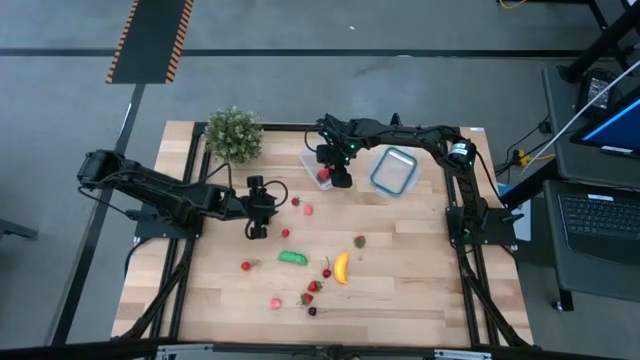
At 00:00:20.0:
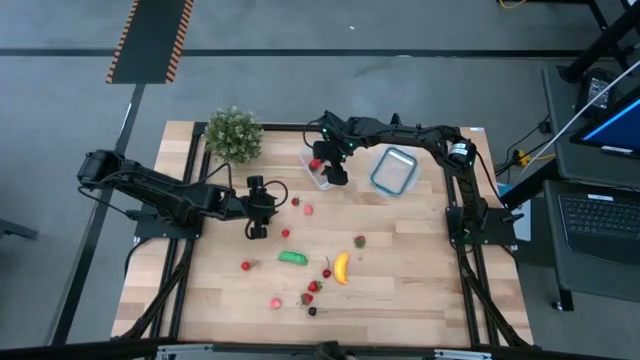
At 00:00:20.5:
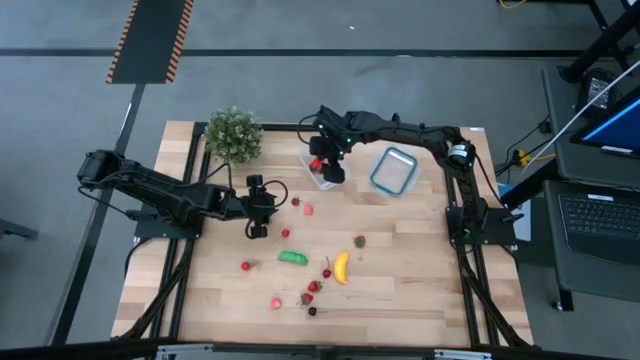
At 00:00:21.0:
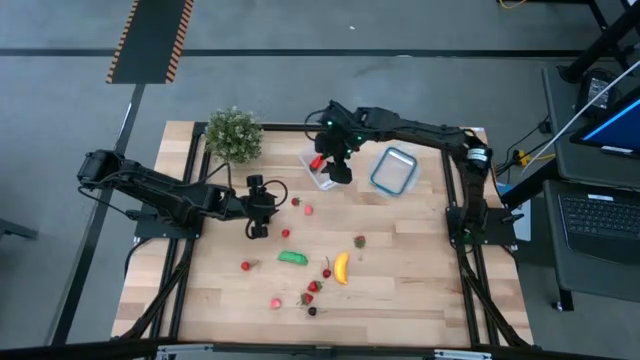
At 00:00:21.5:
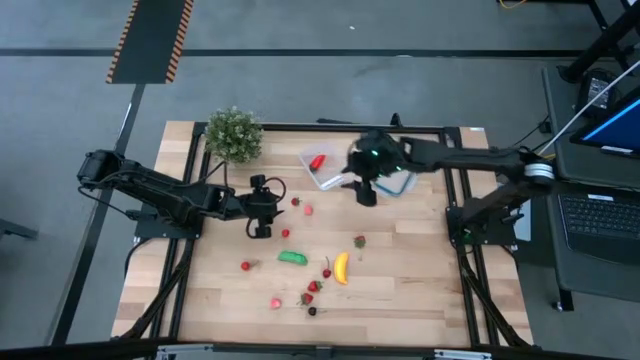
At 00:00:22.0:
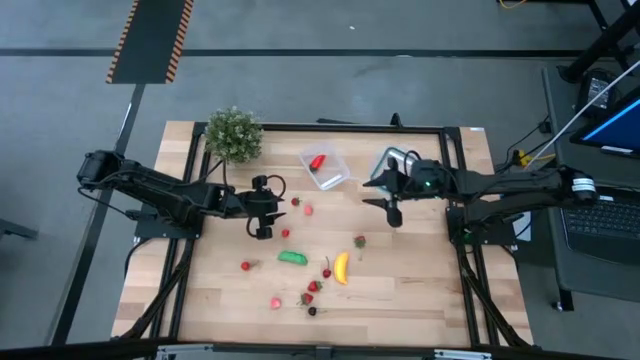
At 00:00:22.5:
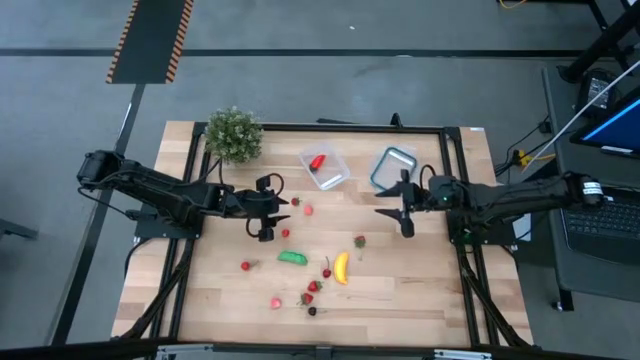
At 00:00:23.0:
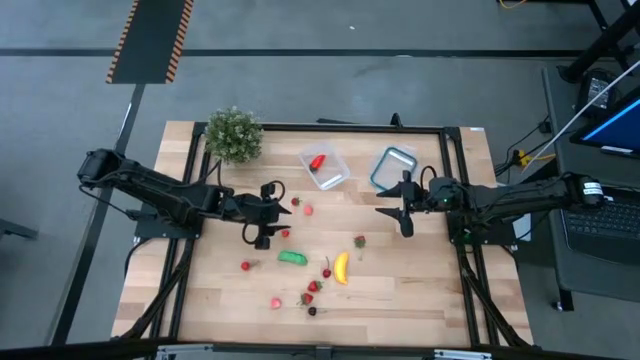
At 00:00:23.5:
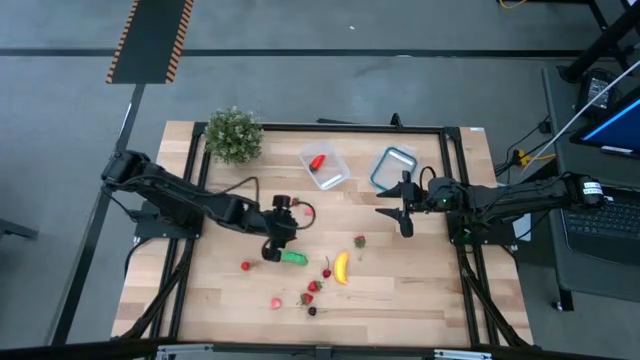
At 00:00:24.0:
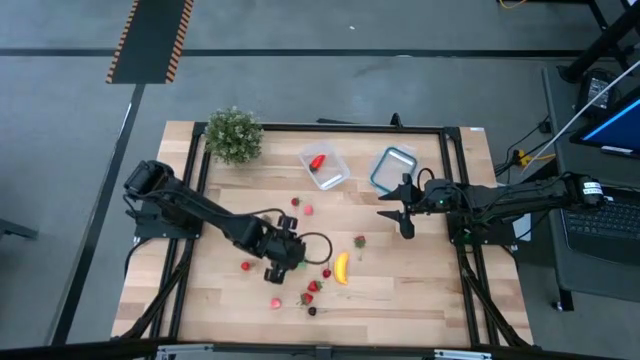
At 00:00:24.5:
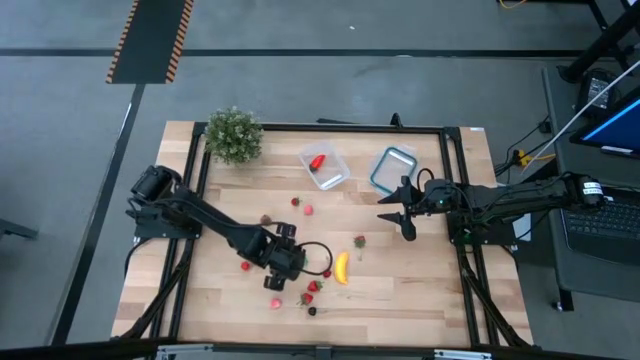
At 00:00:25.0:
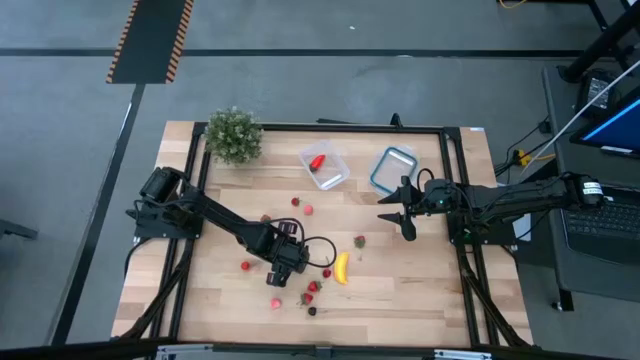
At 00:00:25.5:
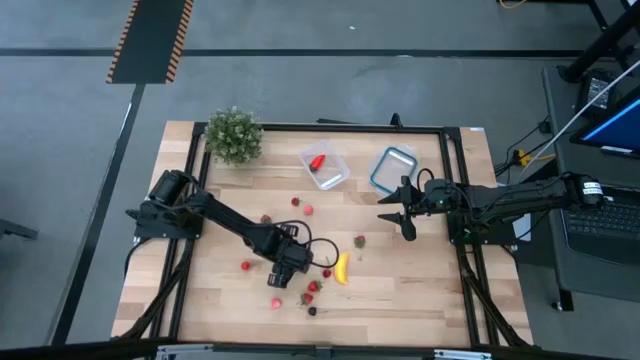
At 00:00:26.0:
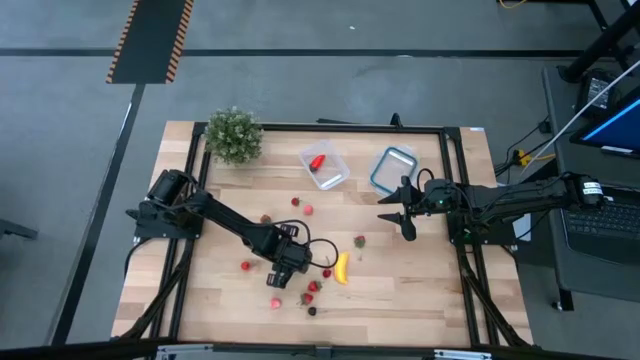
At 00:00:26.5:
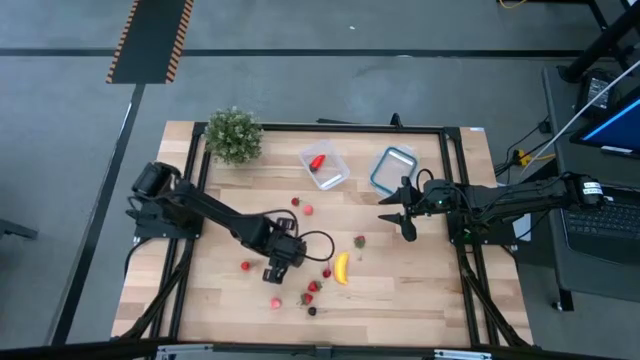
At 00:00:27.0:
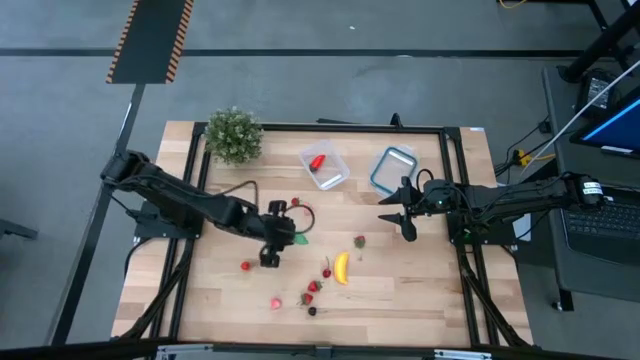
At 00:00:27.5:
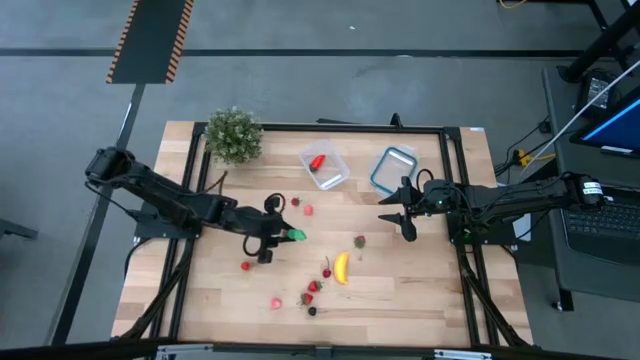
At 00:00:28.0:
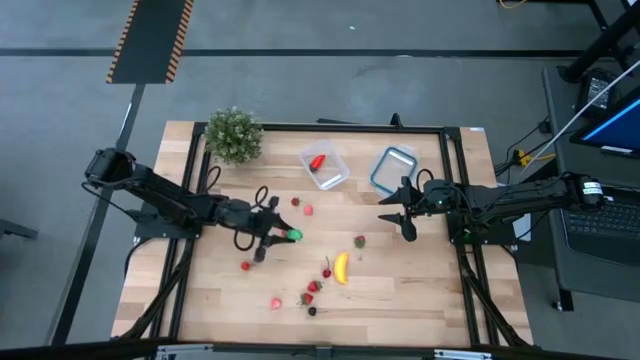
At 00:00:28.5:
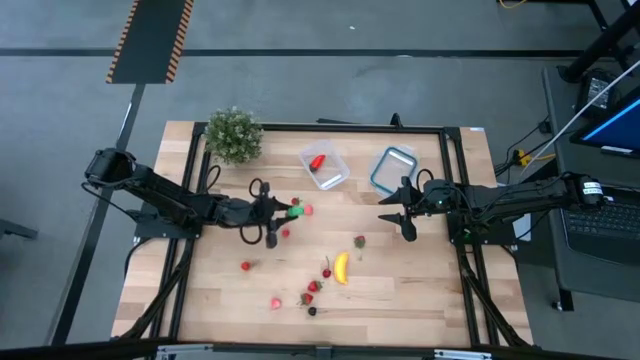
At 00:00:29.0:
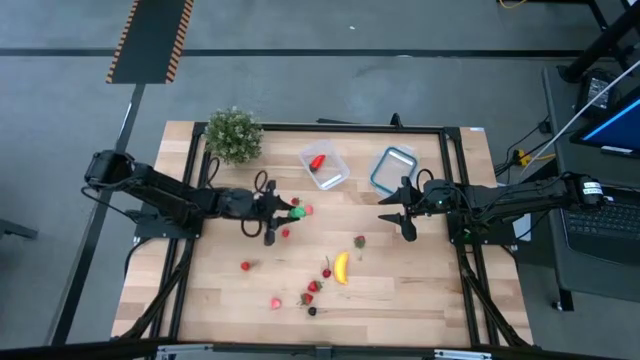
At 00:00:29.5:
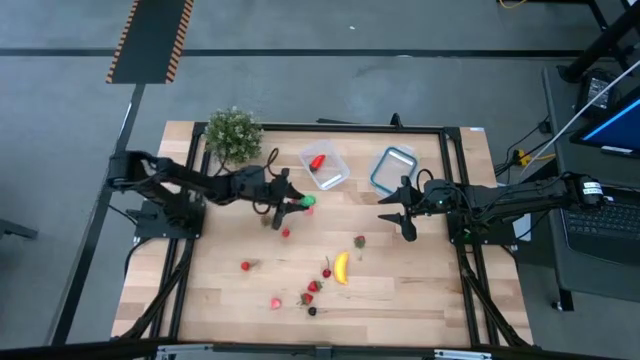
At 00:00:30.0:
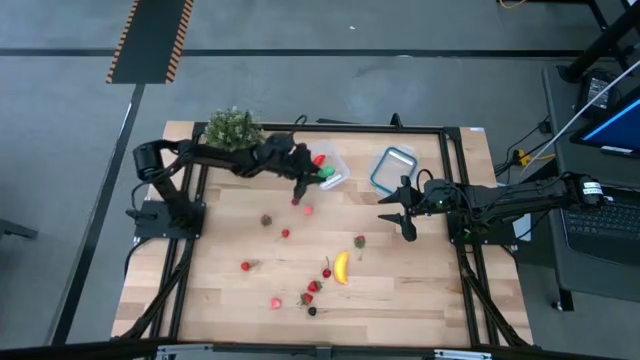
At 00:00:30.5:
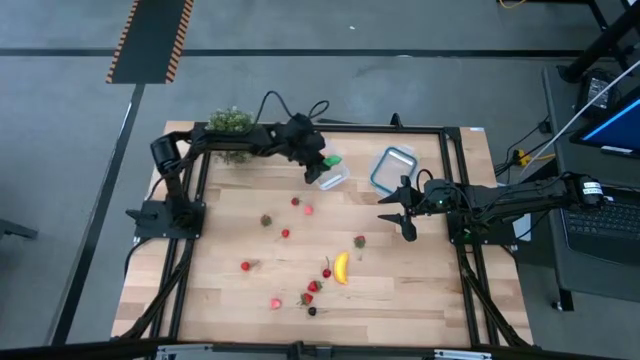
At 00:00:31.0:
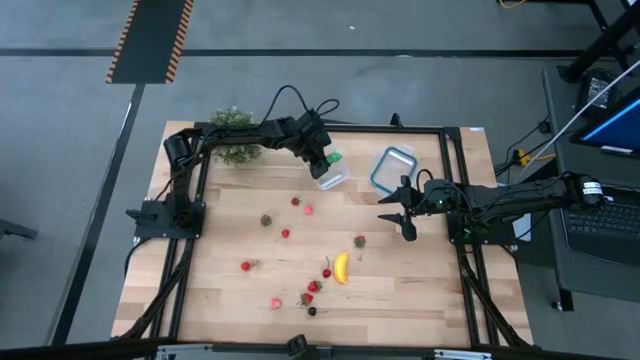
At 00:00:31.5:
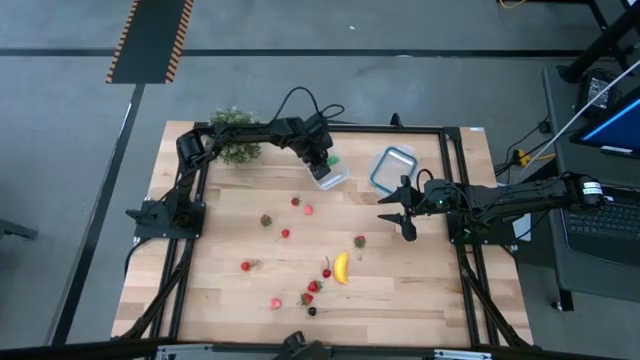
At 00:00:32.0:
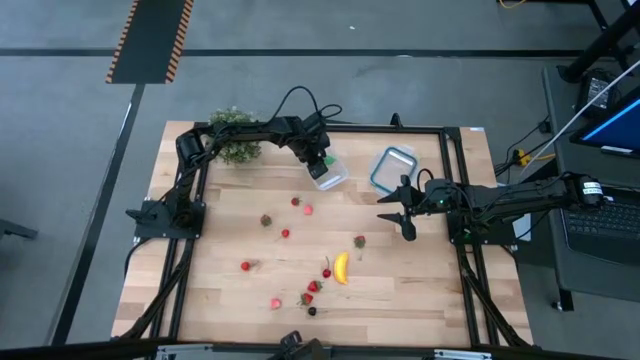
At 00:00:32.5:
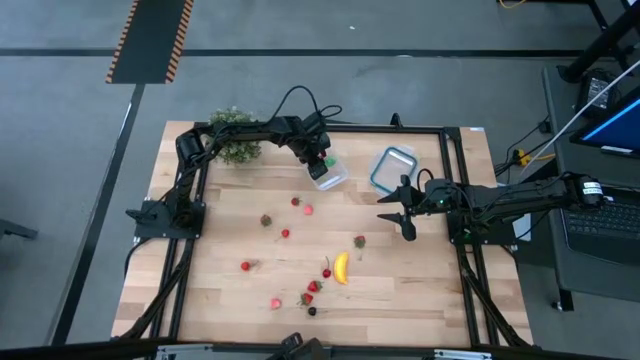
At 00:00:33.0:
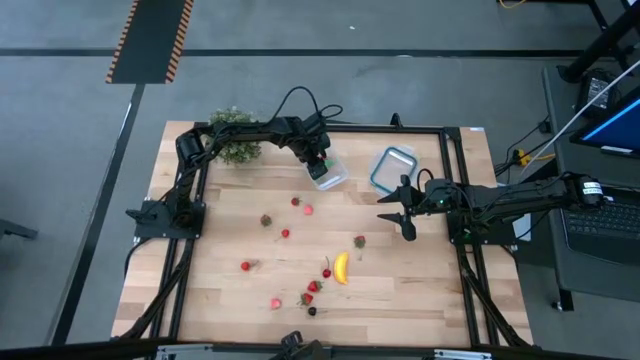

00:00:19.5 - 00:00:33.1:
Task: Pick and placing Produce into tupperware
Put the green pea into the transparent container
